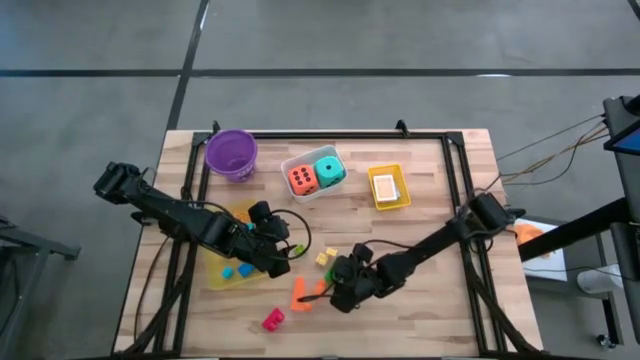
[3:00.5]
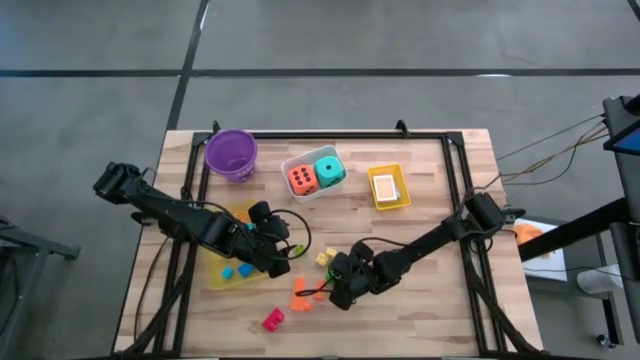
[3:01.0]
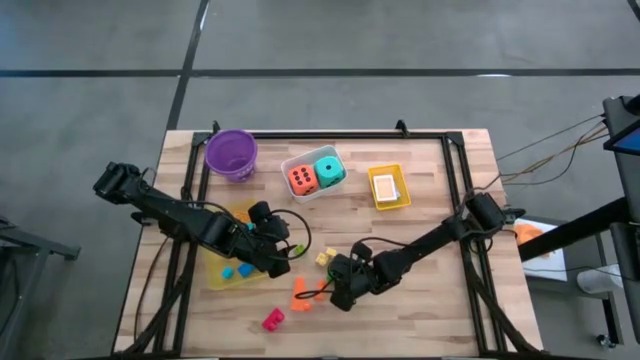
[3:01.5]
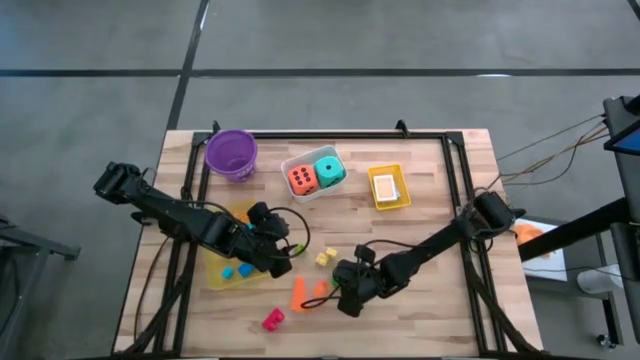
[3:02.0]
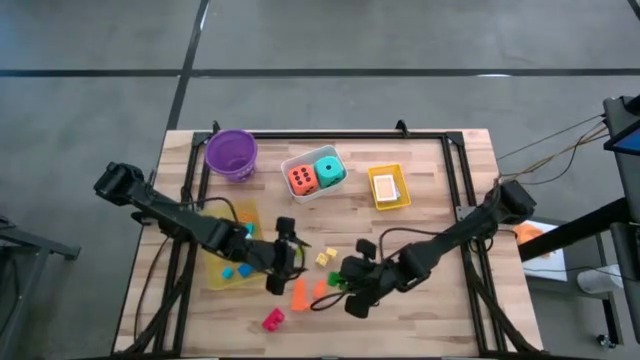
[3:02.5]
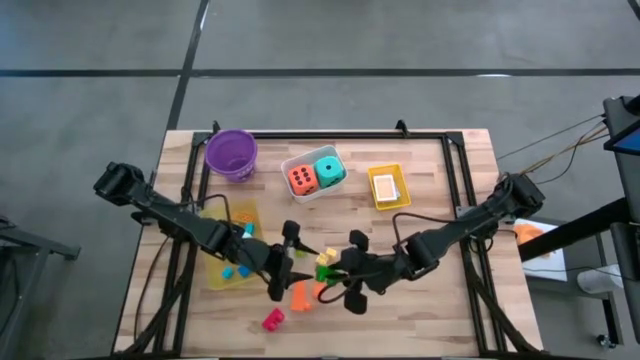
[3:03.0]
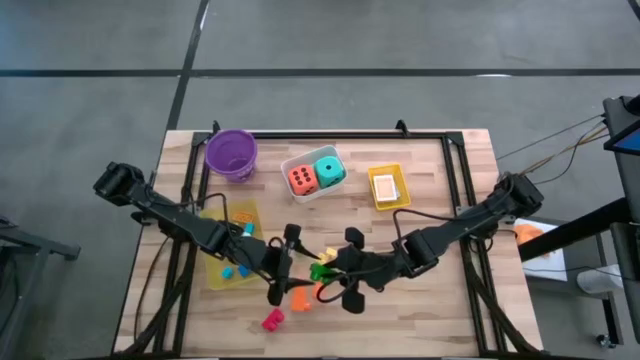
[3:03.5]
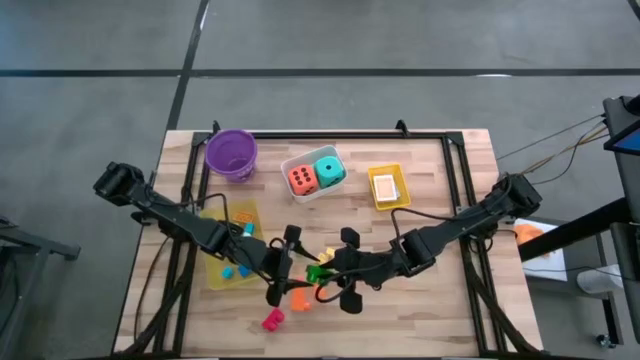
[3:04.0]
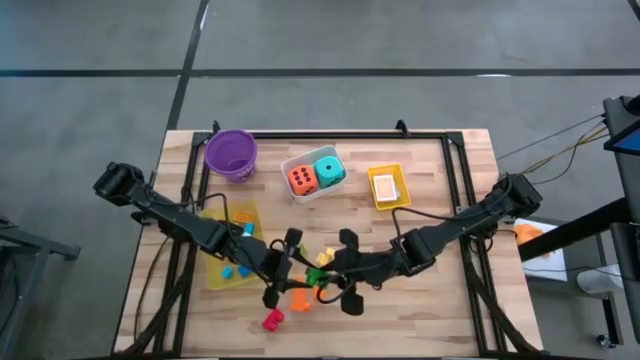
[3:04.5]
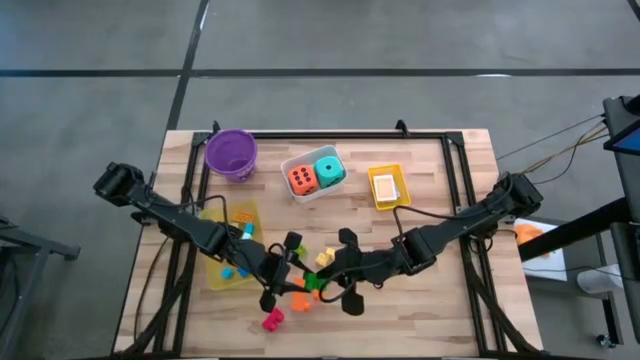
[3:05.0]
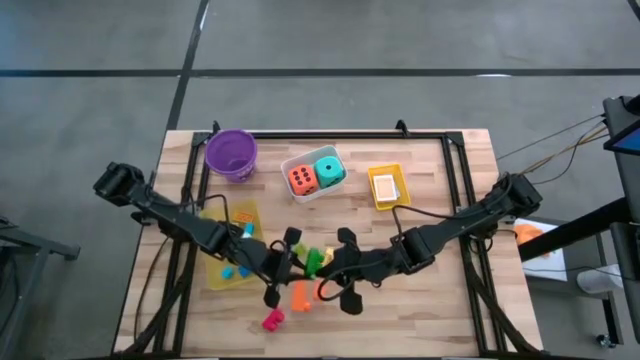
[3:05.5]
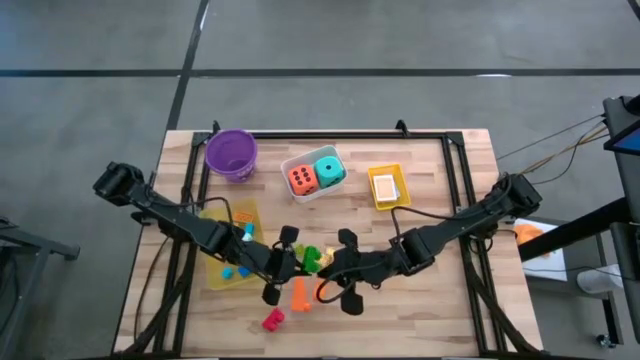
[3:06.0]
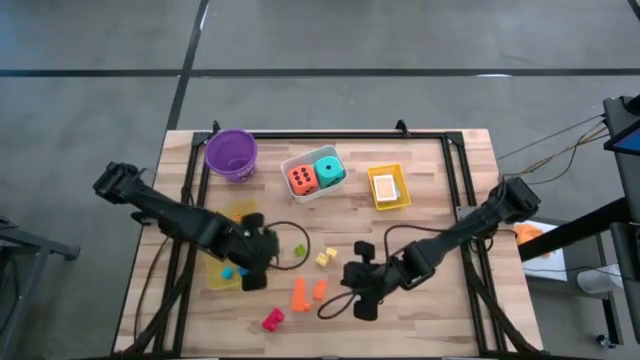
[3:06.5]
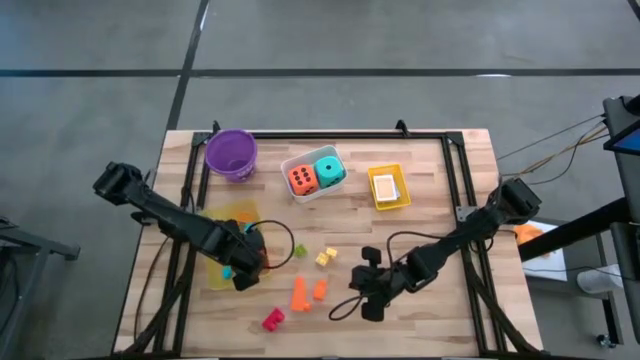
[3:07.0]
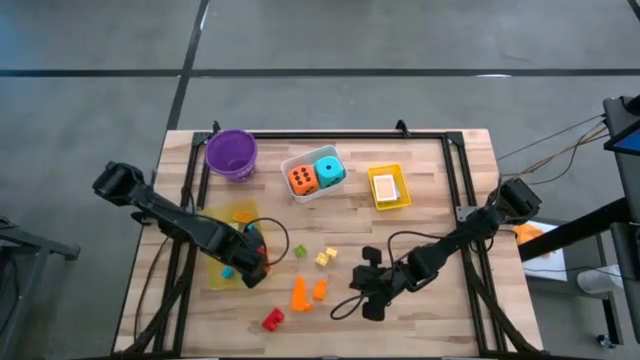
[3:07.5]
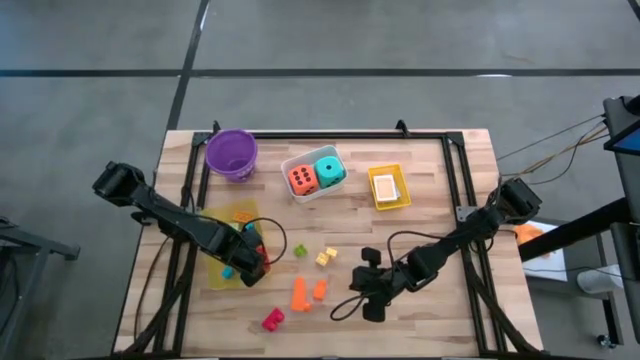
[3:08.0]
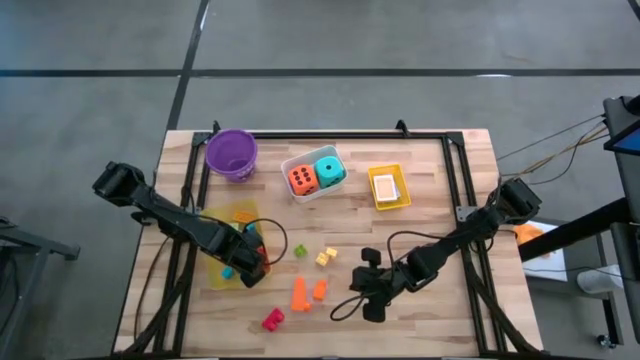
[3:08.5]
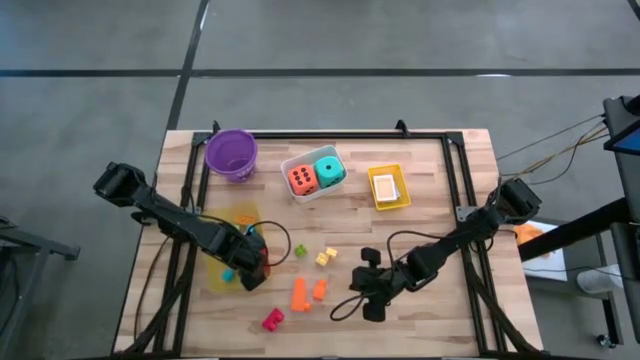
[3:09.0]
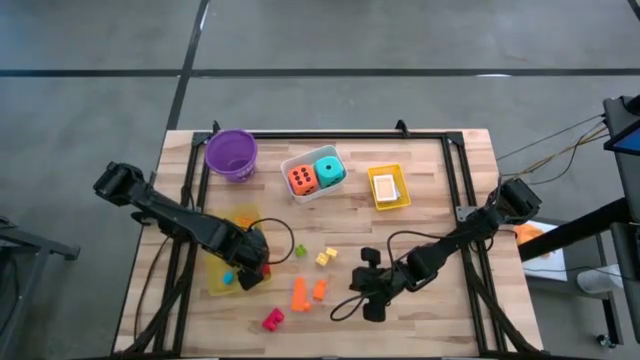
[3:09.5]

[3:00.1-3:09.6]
Task: Pick & Place Toys
Put the dark green game piece into the light yellow bin

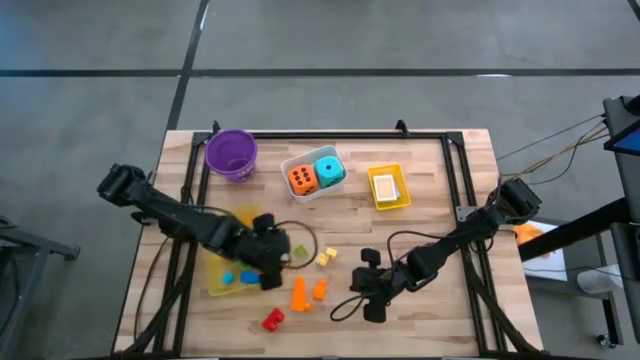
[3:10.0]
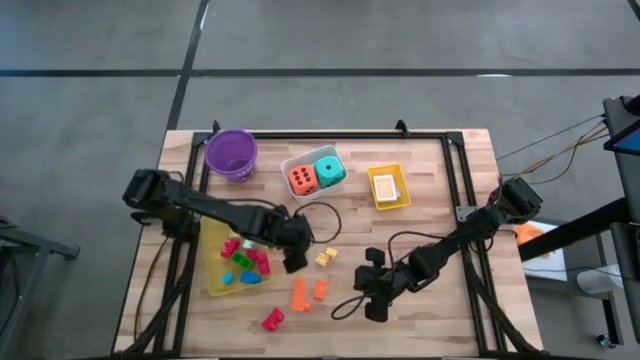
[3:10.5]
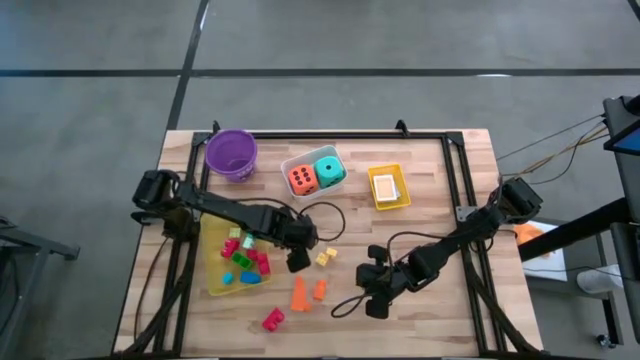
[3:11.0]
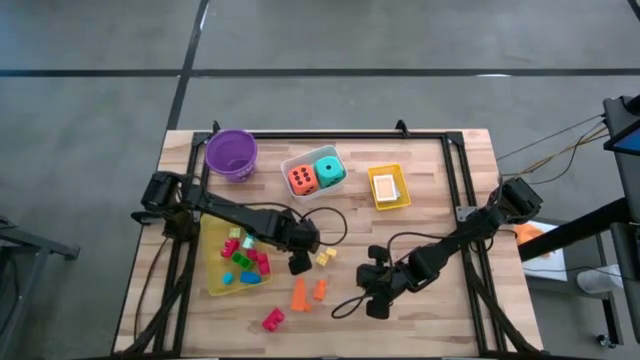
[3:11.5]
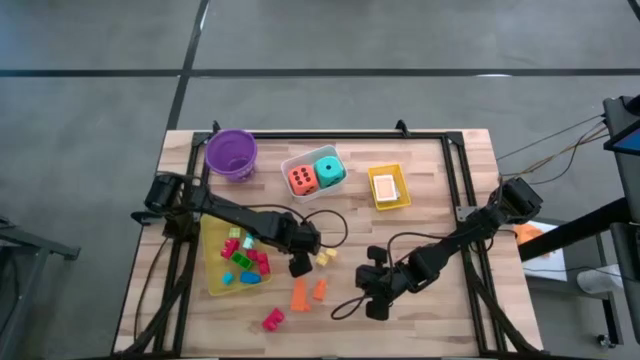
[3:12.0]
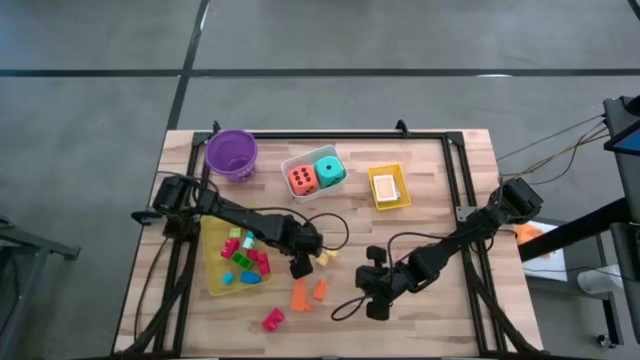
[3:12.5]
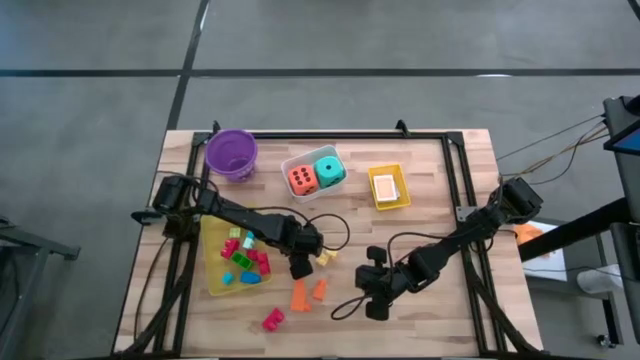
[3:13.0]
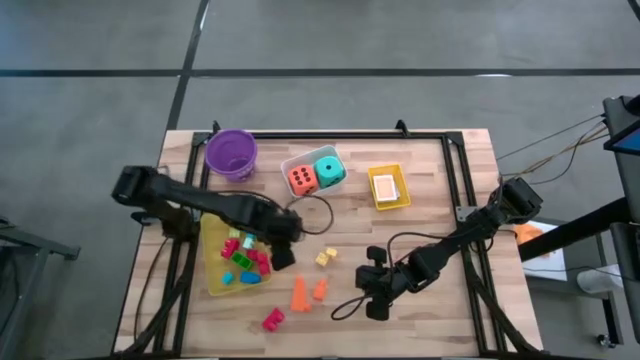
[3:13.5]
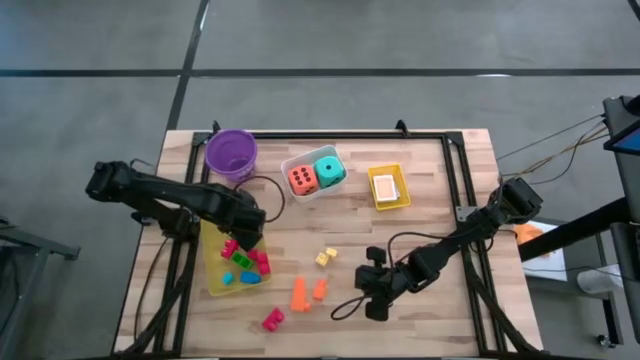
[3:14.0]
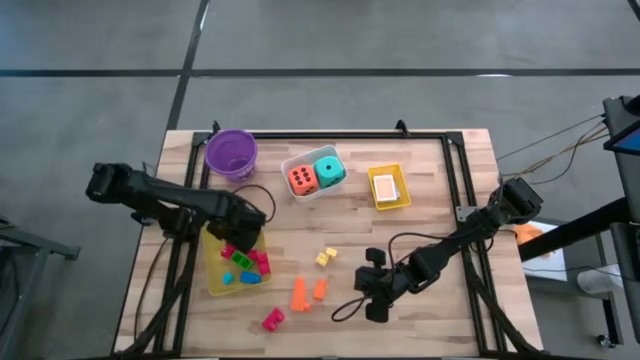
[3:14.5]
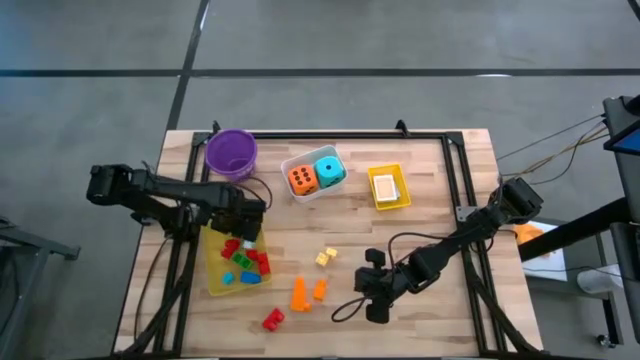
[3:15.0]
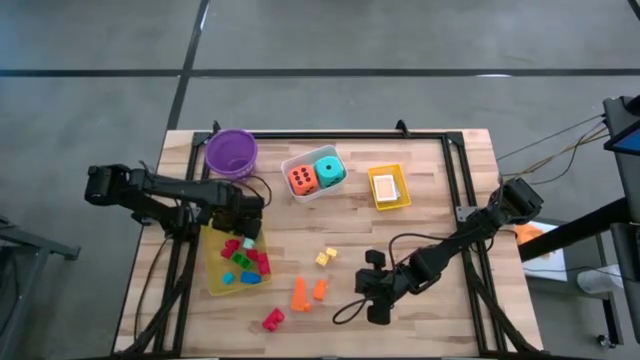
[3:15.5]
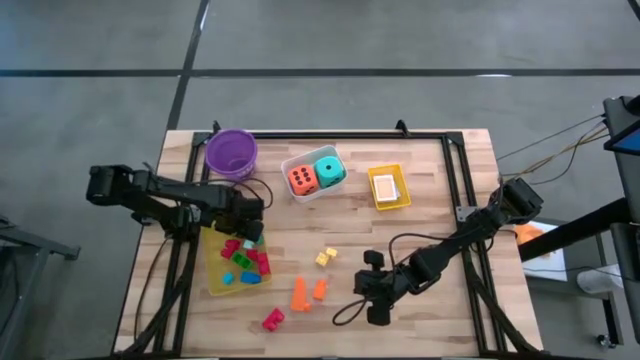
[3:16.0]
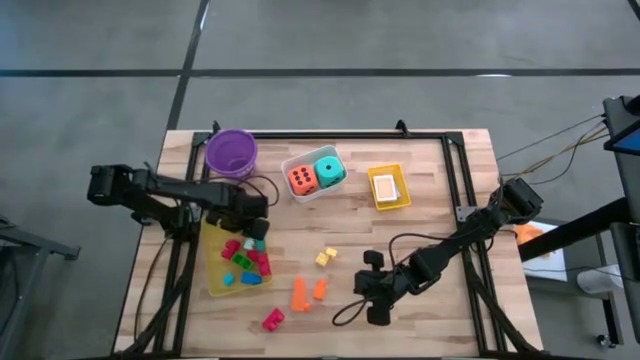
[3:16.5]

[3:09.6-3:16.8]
Put the green game piece into the light yellow bin

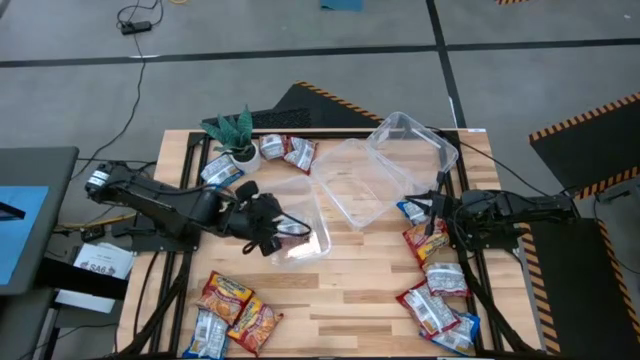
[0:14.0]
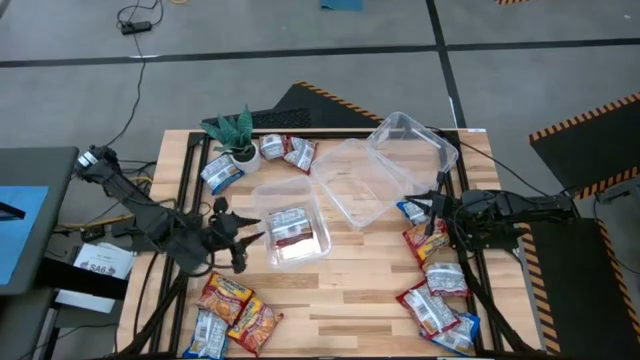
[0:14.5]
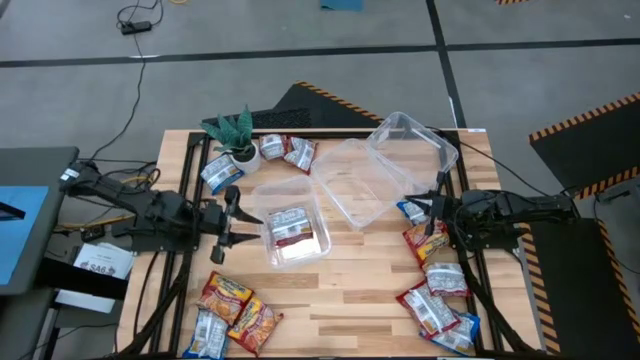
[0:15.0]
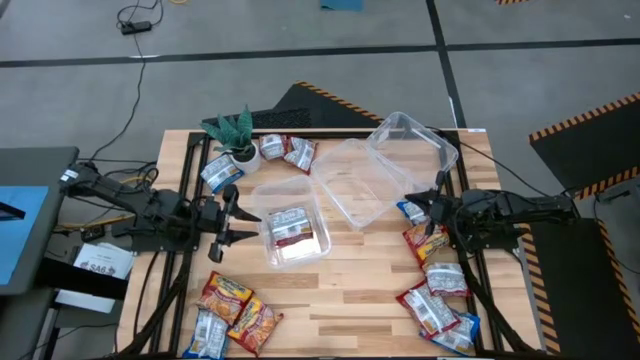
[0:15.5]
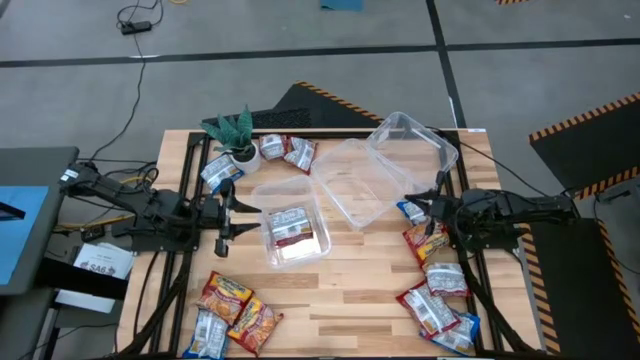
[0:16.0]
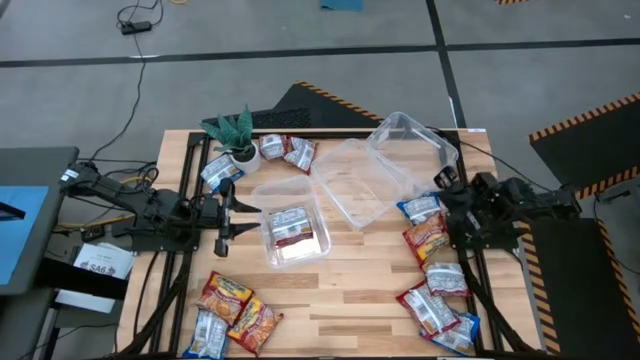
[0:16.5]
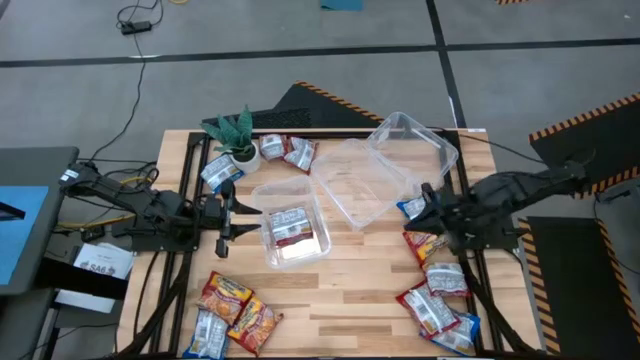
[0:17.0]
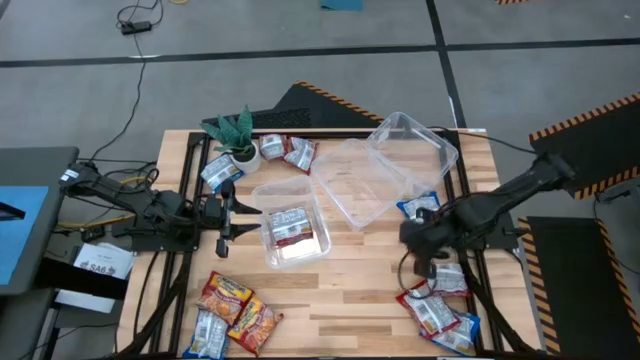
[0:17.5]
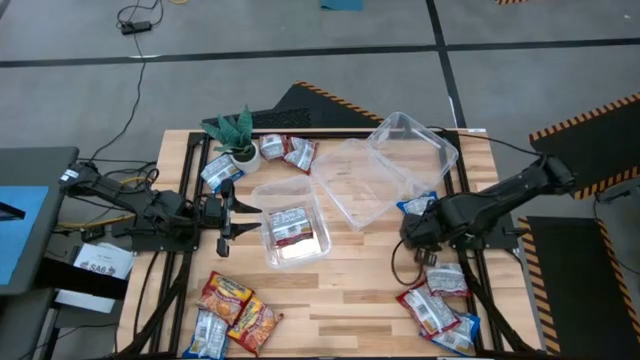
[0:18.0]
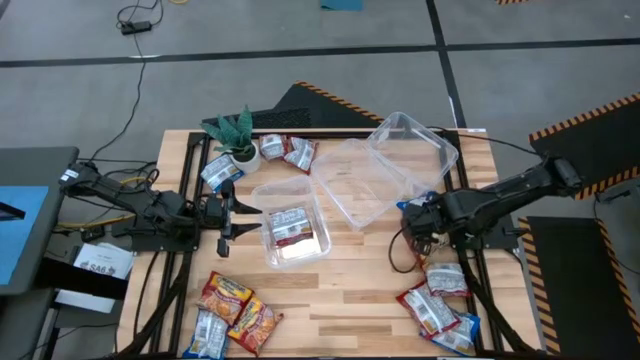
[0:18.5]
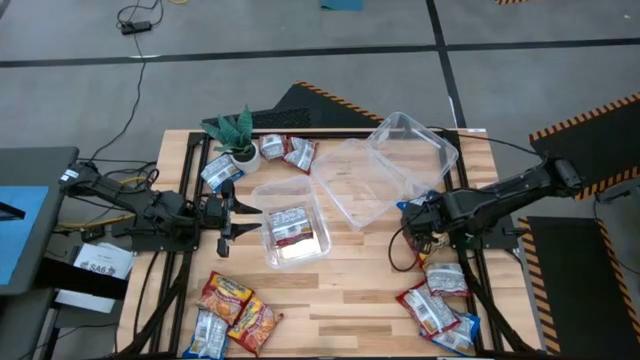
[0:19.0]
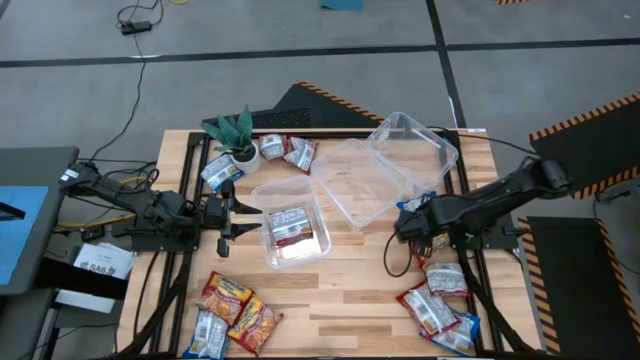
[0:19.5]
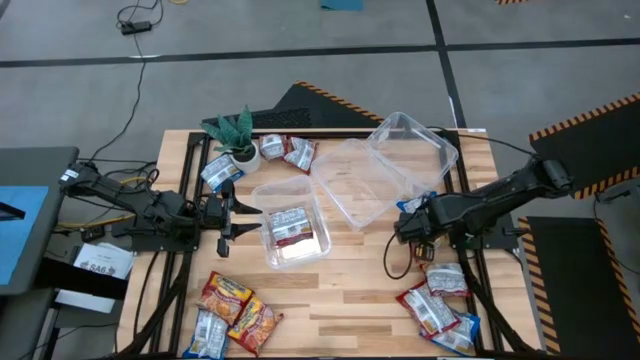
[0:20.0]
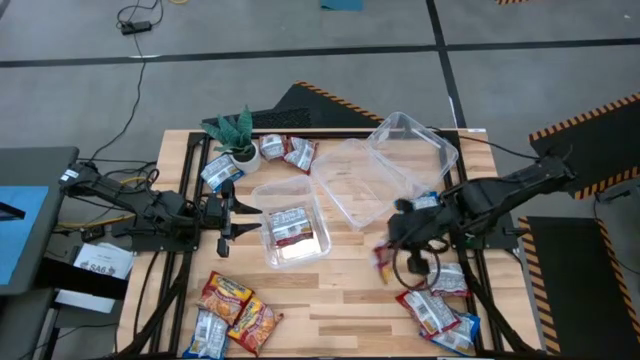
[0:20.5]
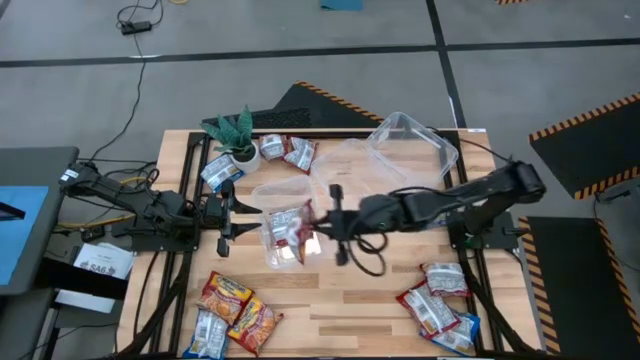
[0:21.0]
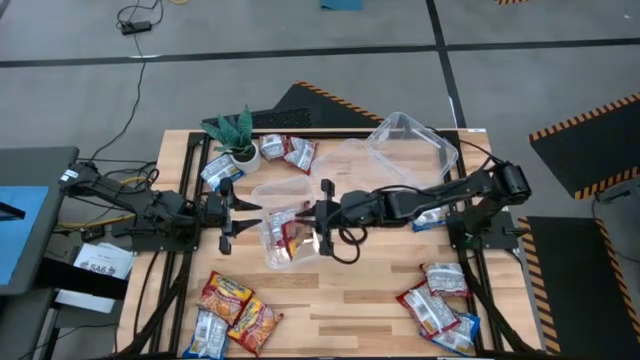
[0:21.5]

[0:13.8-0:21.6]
Task: Sort Maruchan noodles
Put the red noodle pack into the bottom bin
